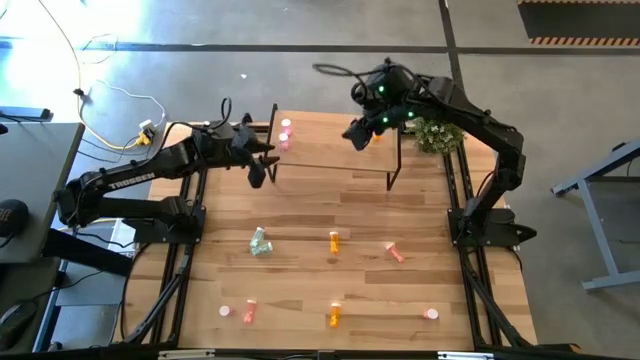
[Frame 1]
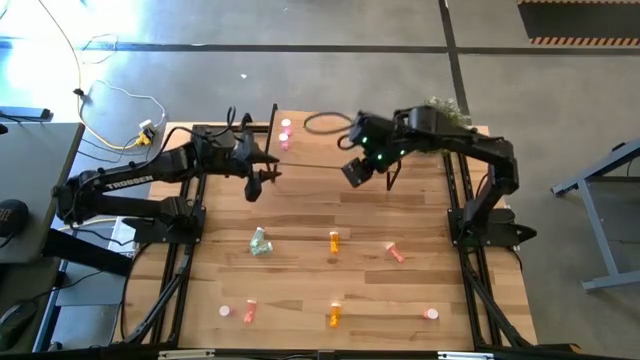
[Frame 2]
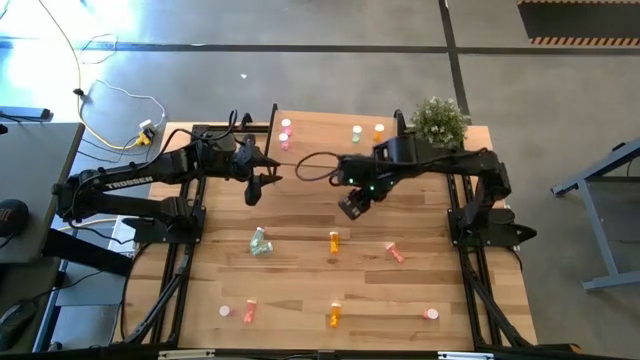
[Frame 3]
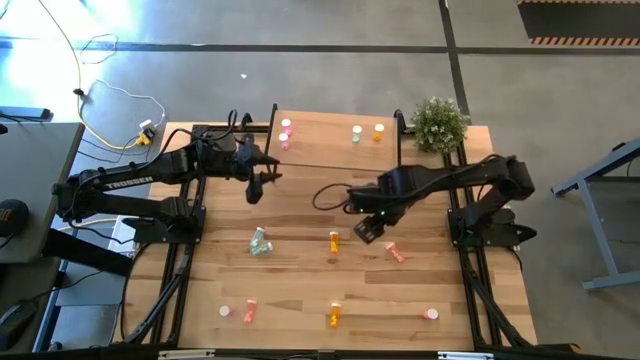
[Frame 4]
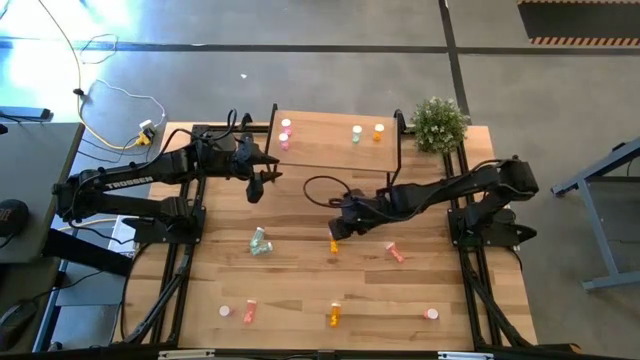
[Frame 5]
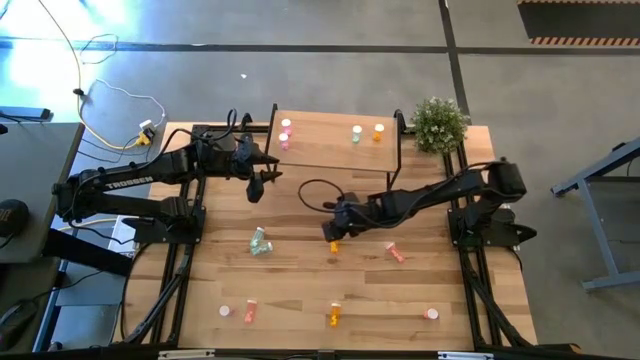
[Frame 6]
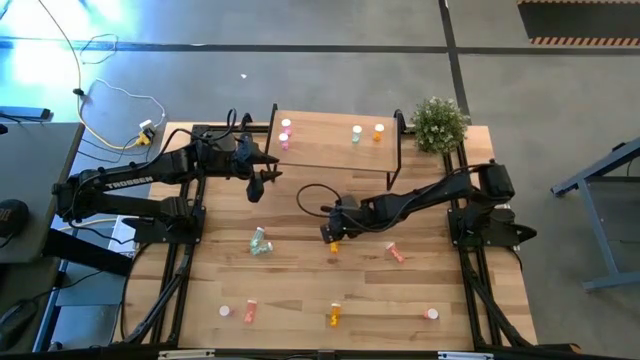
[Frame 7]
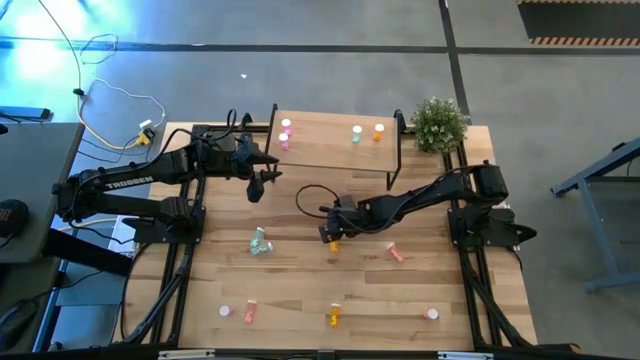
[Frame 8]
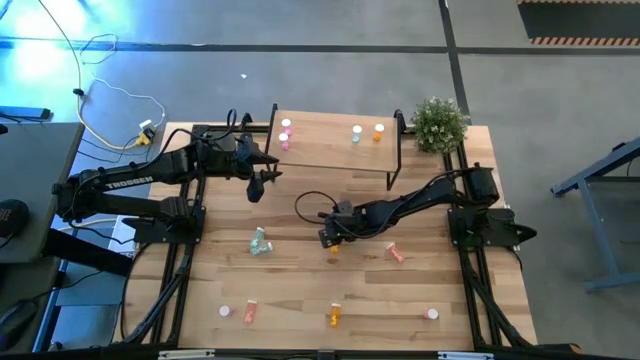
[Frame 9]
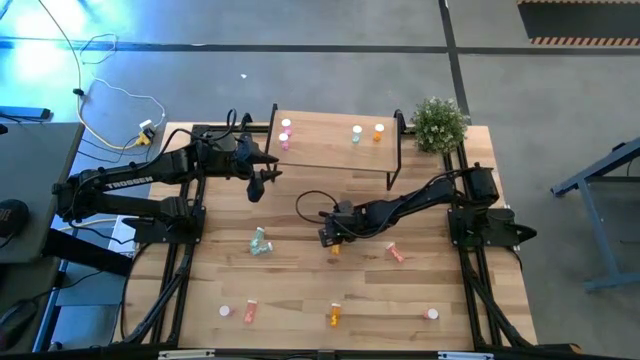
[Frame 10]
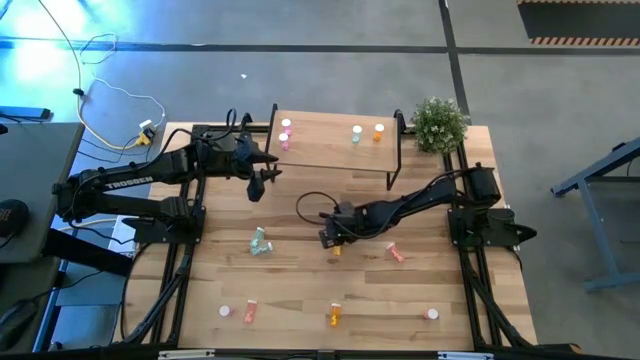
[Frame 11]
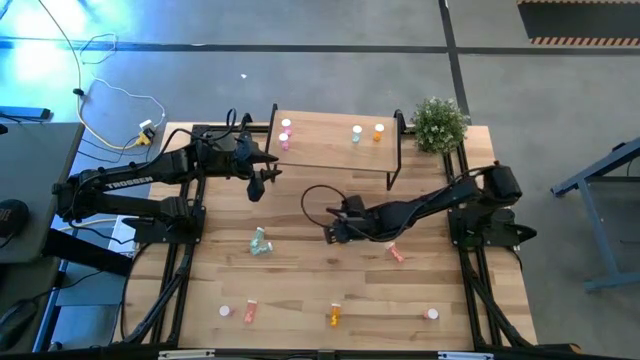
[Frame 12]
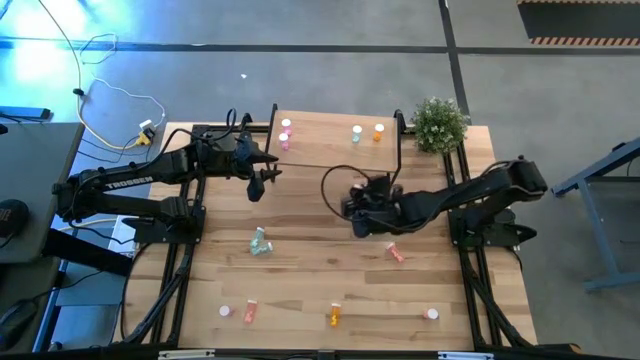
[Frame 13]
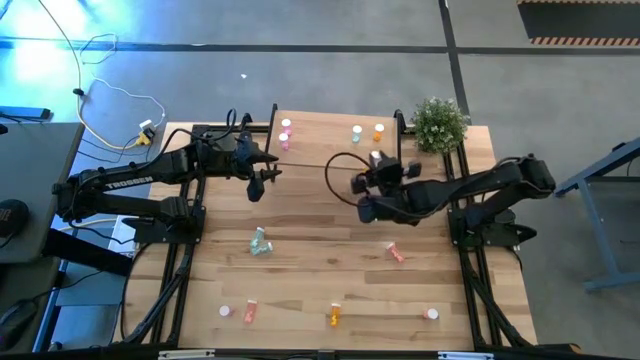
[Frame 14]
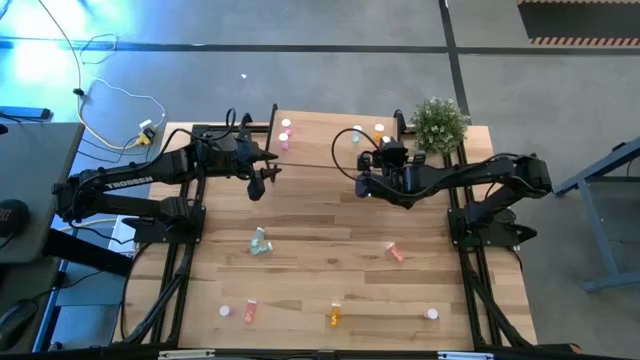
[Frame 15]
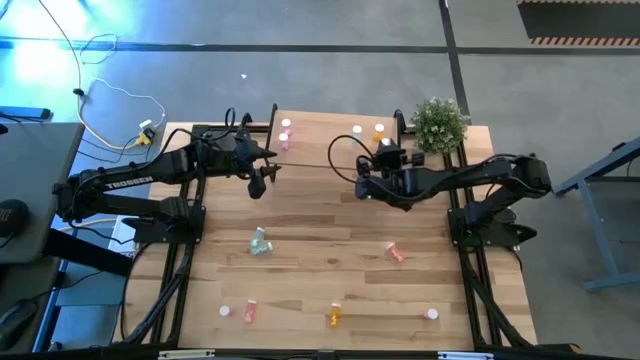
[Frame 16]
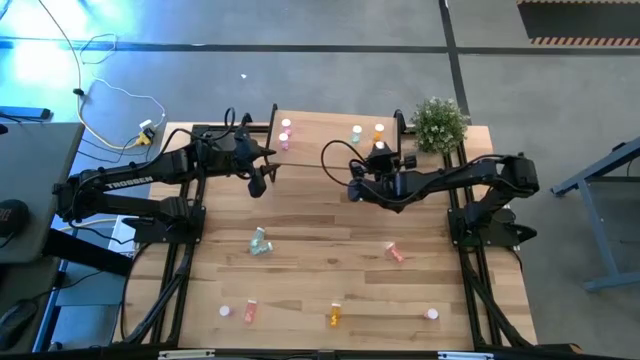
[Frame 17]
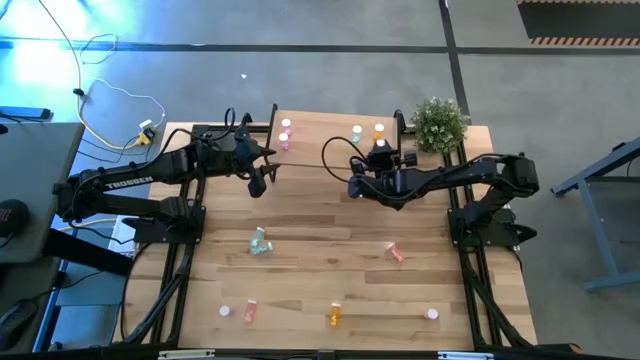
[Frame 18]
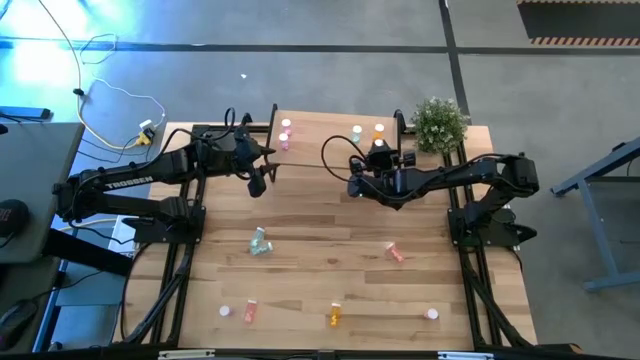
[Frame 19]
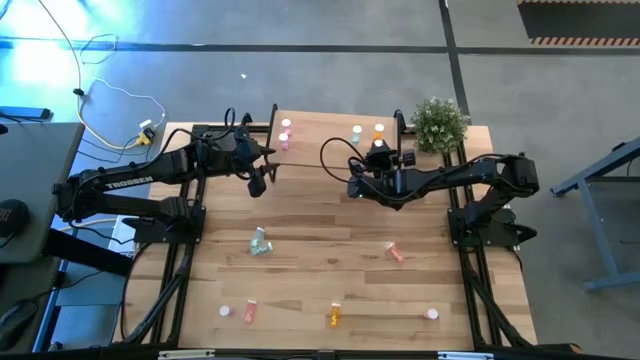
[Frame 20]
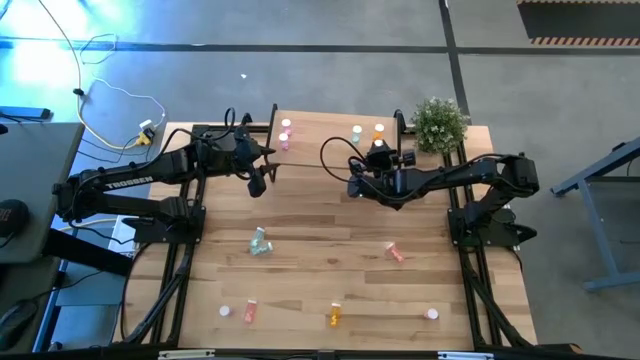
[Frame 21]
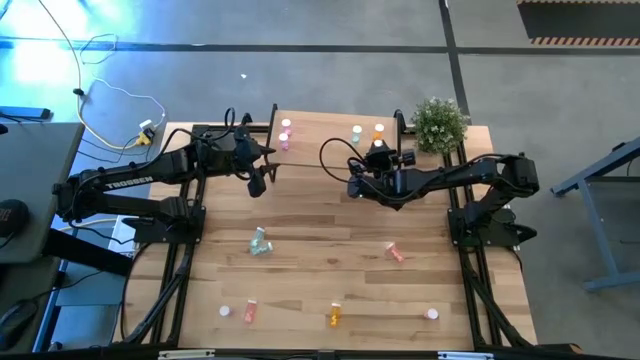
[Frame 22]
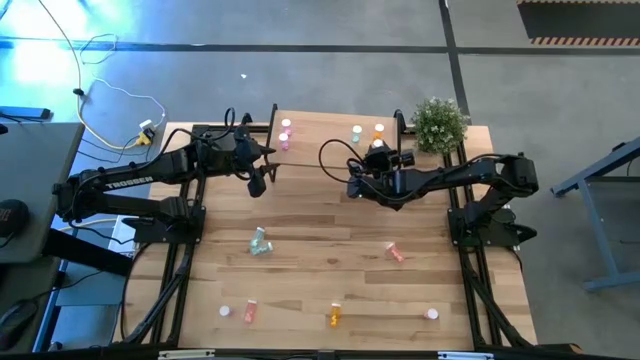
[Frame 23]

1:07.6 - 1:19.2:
Task: Pick and place medicine bottles onto shelf by color
Put the top orange pill bottle aligned with the other orange pill bottle on the shelf

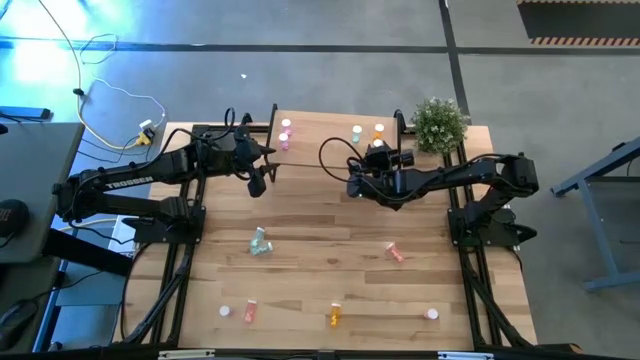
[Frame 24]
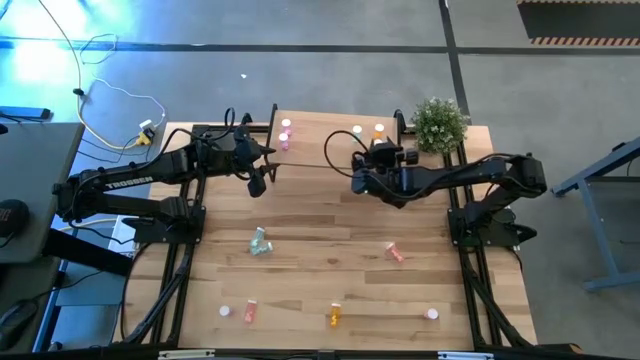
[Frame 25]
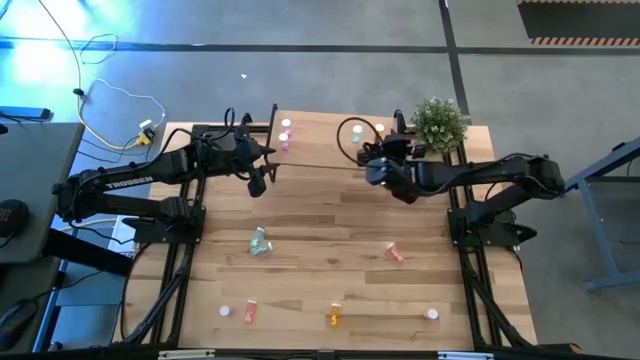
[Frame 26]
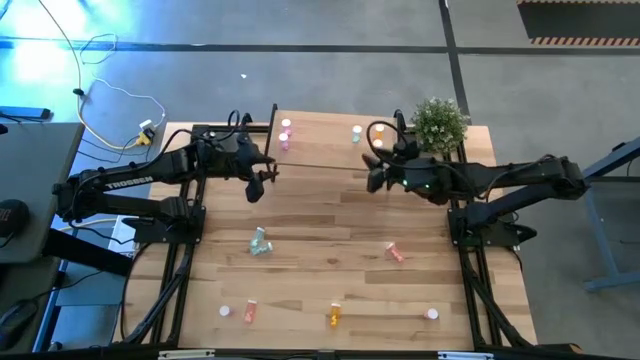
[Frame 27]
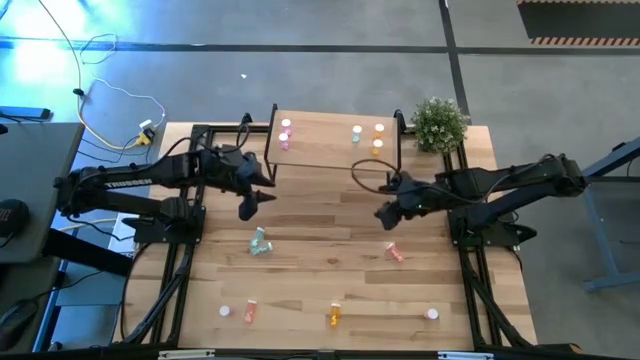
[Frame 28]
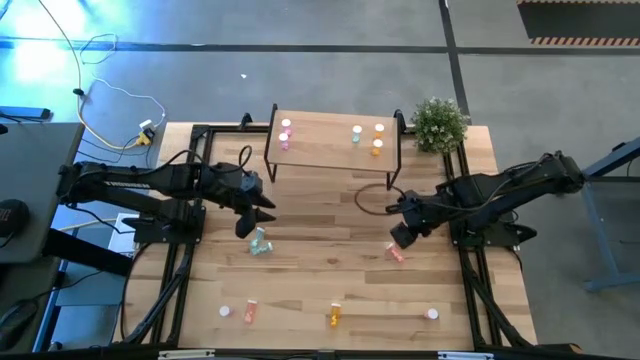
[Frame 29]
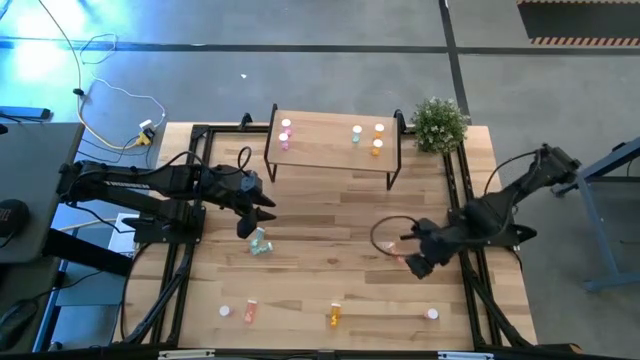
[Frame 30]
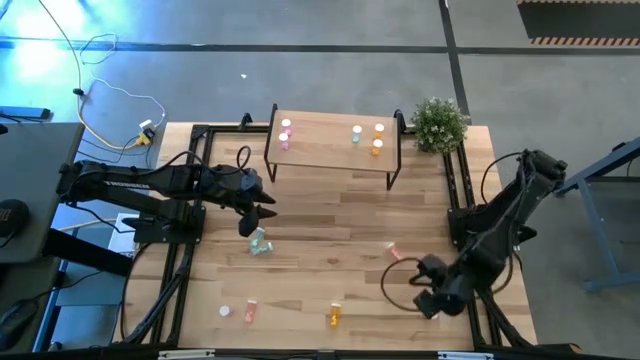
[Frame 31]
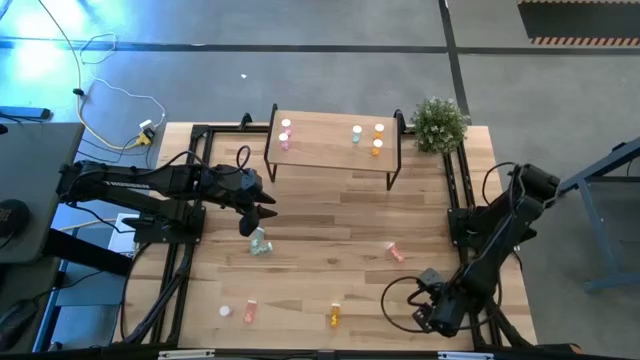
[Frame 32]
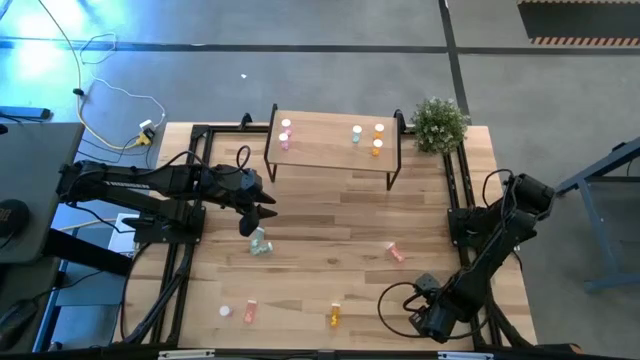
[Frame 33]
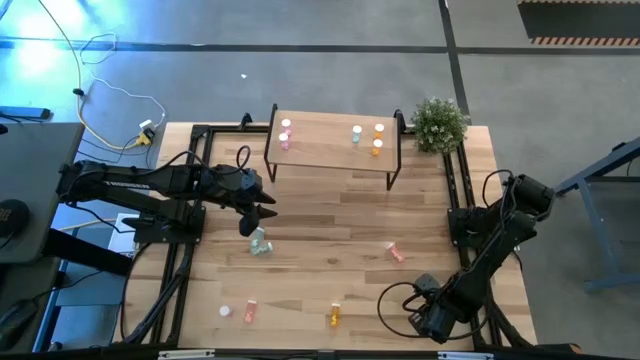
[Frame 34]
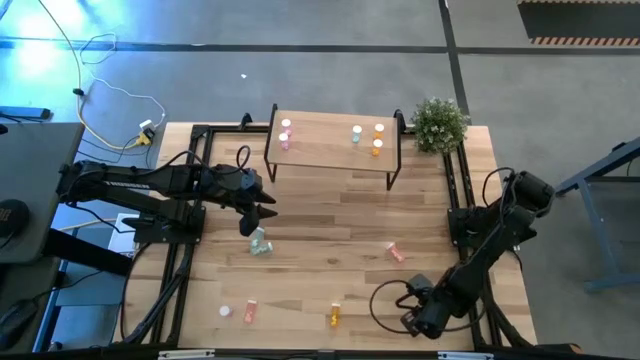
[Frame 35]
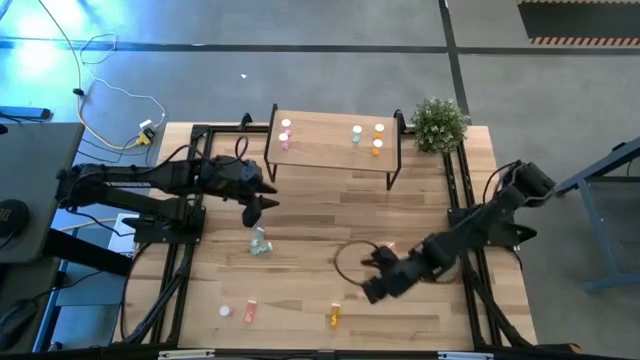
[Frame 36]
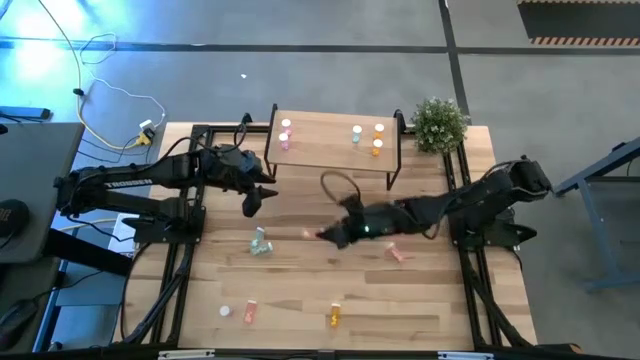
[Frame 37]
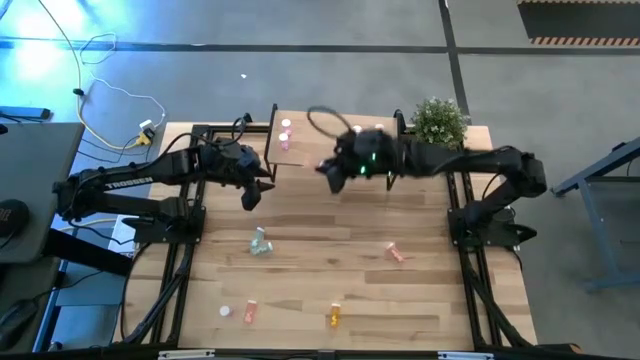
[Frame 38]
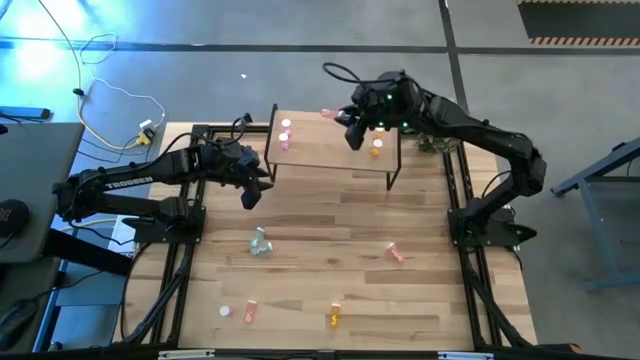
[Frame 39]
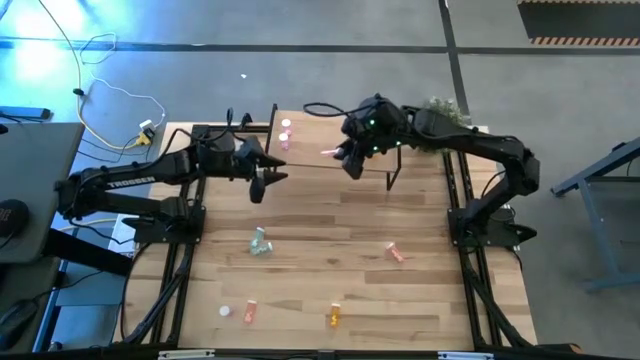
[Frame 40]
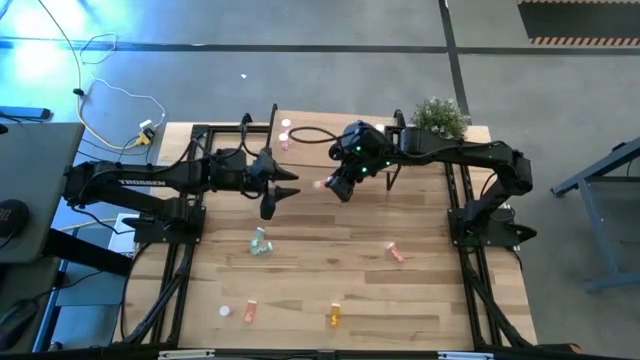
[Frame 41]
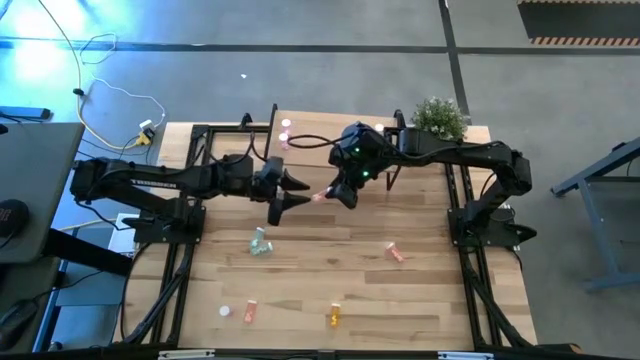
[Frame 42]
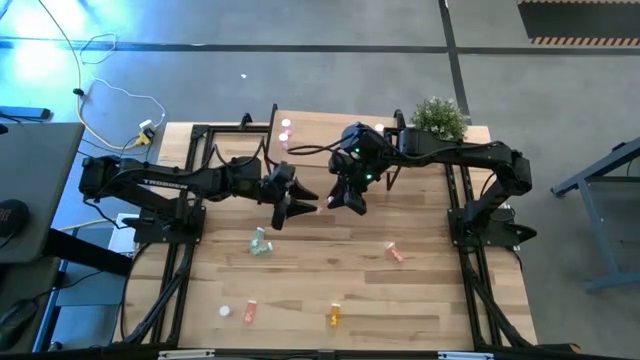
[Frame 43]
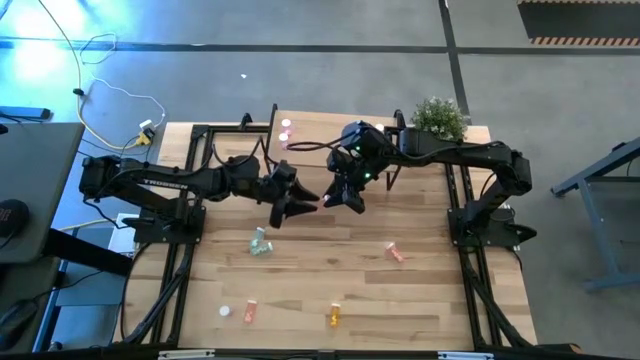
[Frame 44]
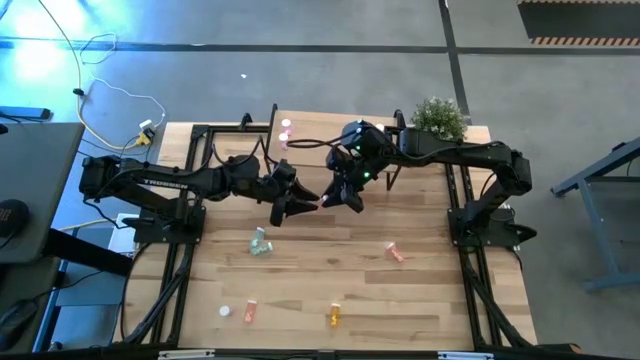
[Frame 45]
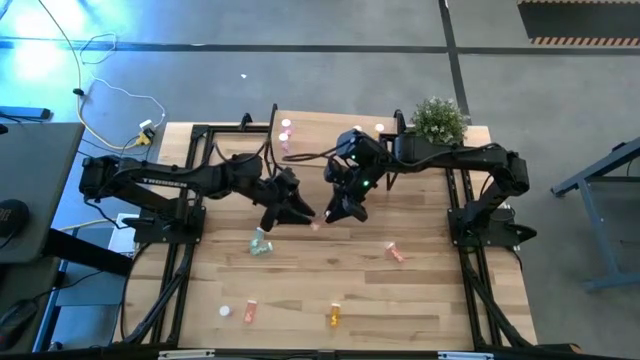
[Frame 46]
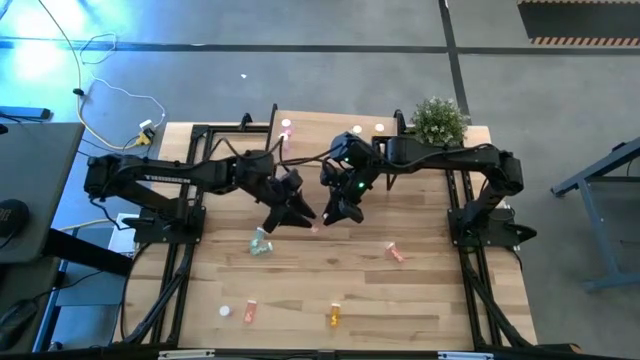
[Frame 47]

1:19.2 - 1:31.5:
Put the bottom right pink pill bottle on the shelf
